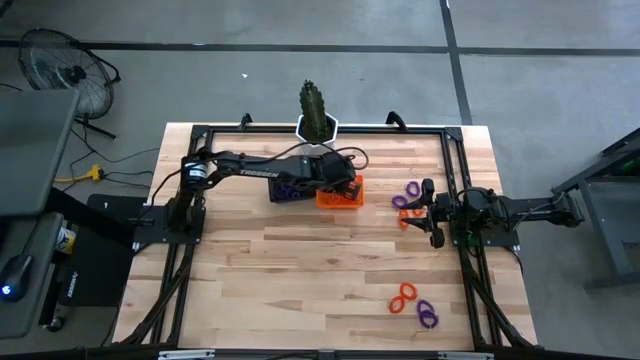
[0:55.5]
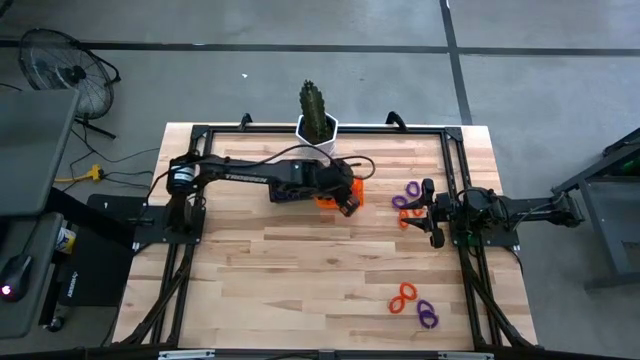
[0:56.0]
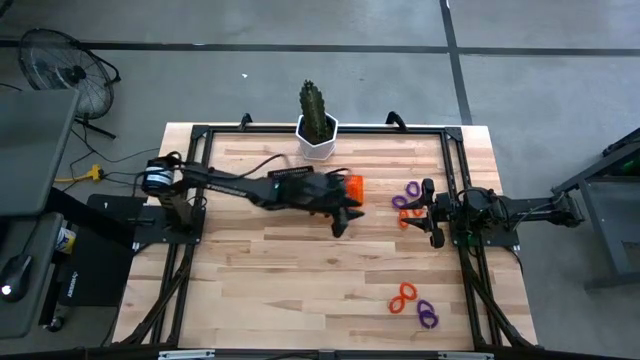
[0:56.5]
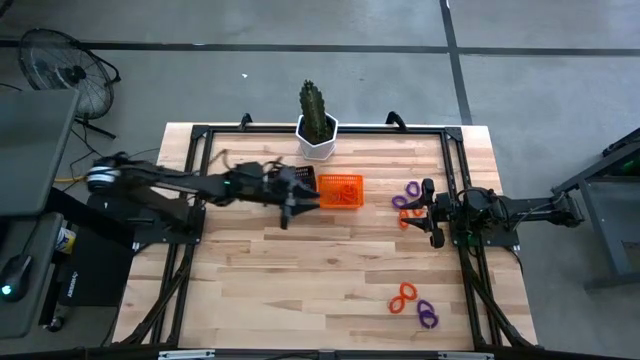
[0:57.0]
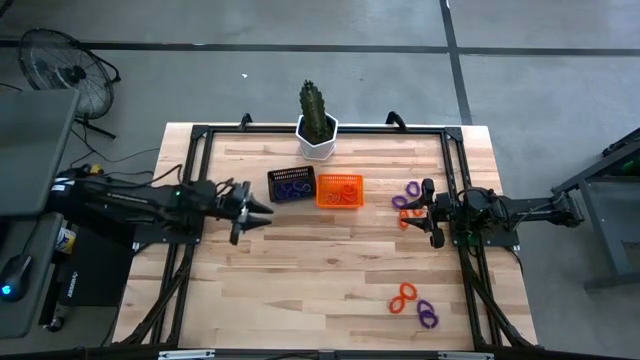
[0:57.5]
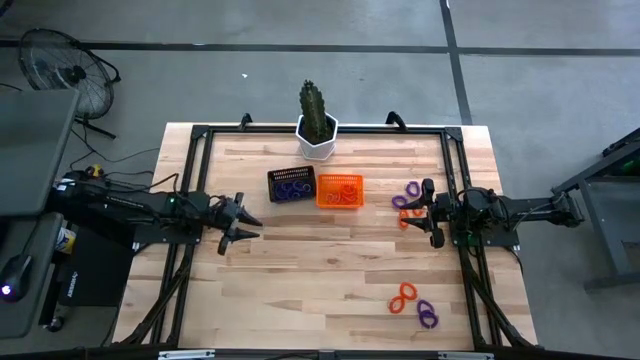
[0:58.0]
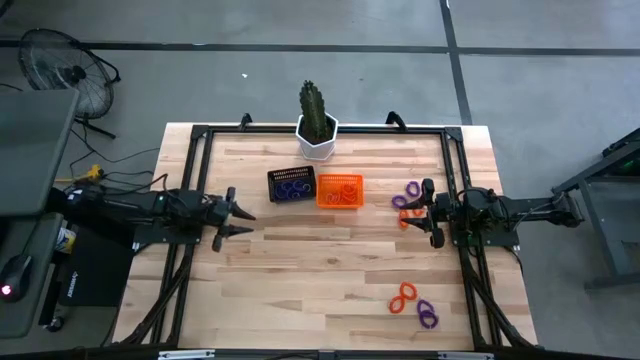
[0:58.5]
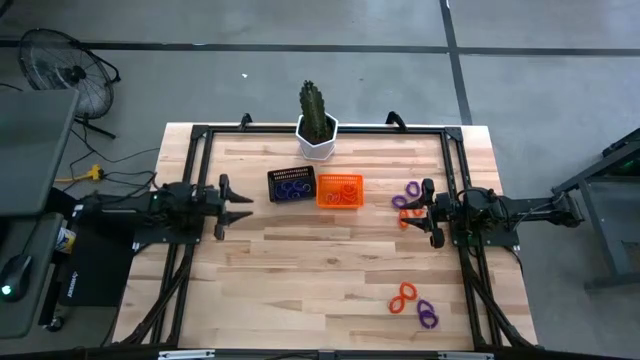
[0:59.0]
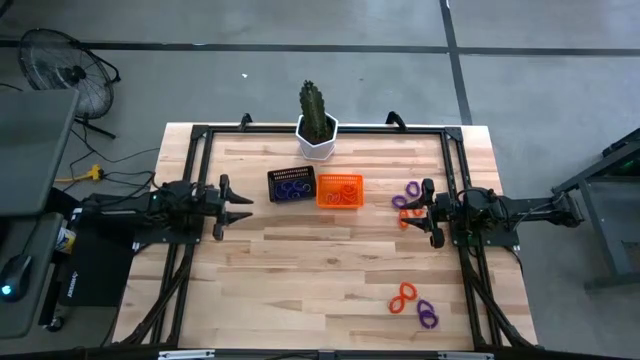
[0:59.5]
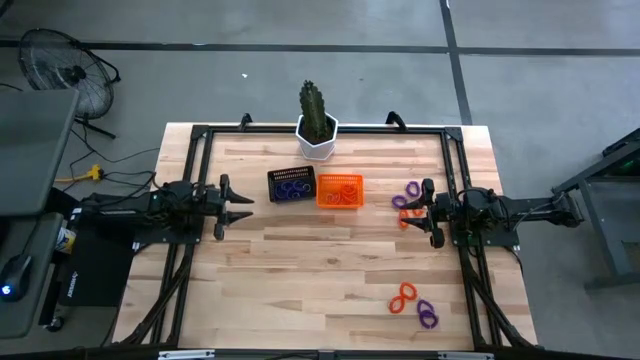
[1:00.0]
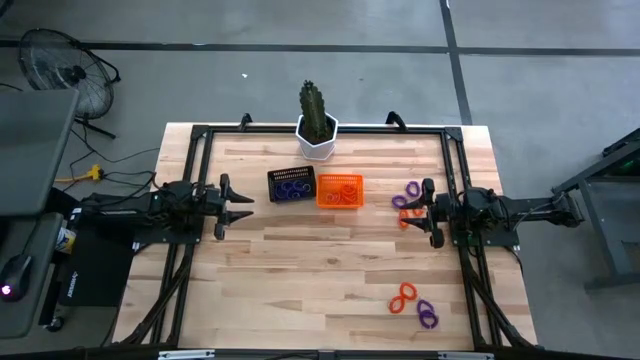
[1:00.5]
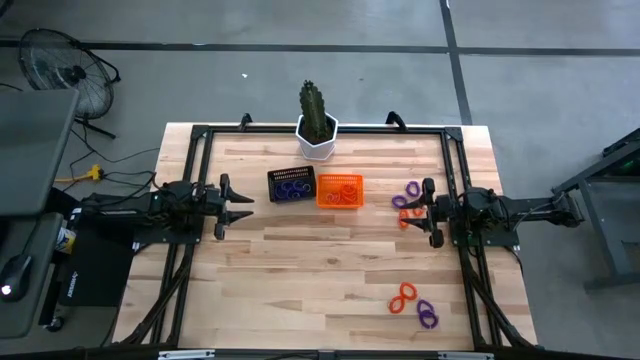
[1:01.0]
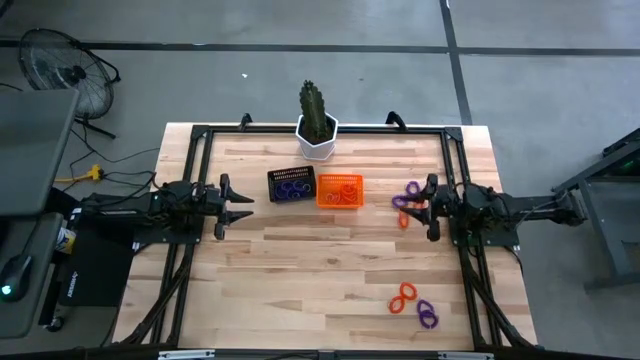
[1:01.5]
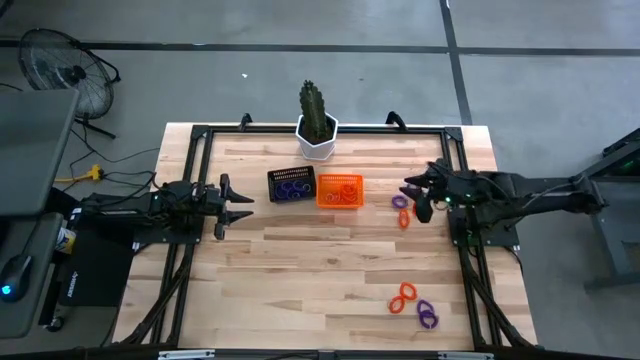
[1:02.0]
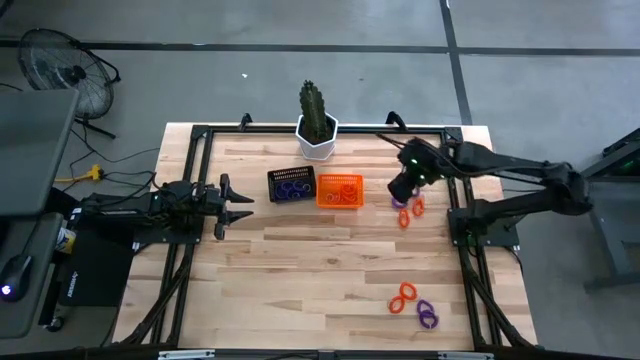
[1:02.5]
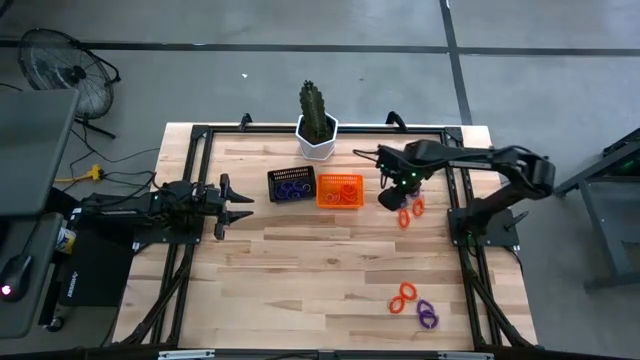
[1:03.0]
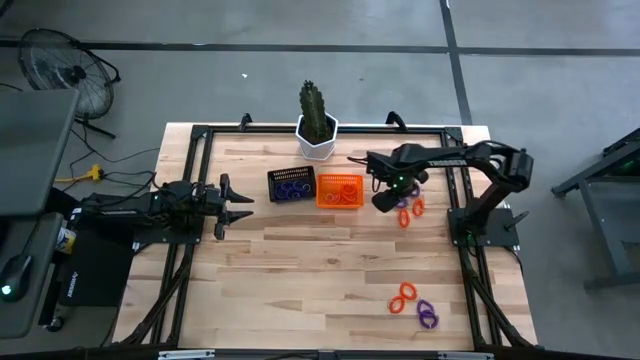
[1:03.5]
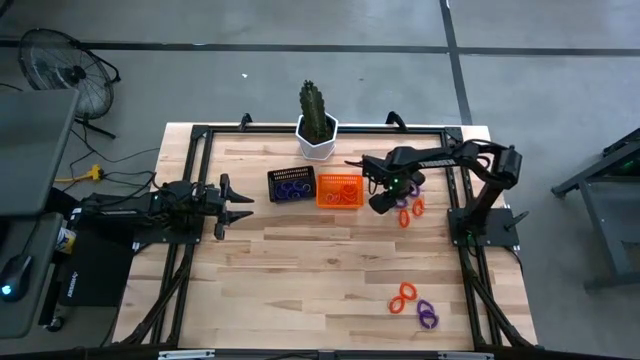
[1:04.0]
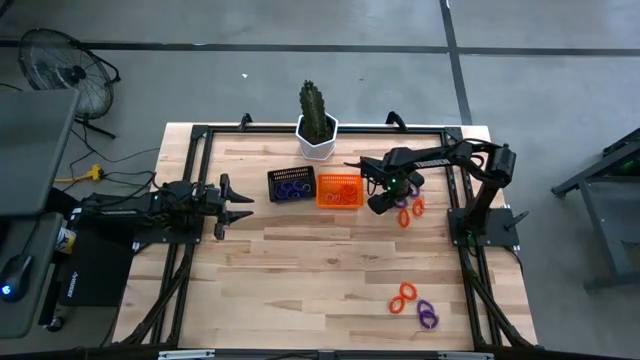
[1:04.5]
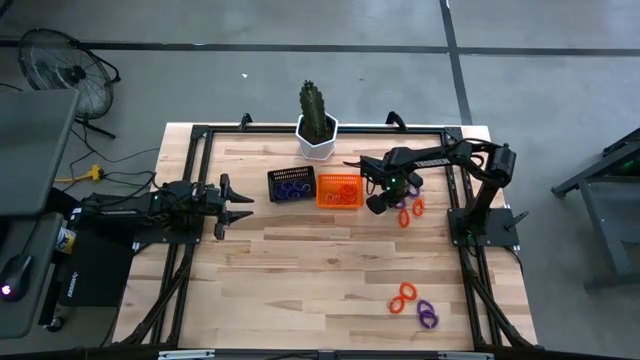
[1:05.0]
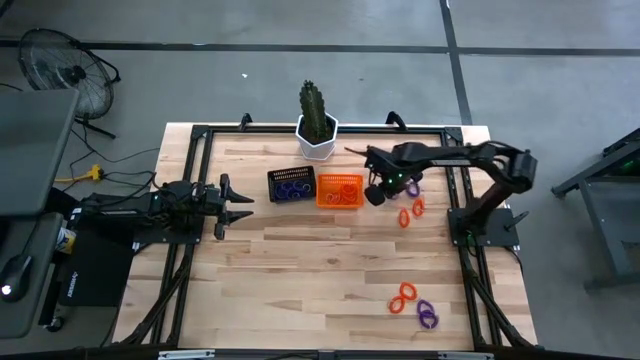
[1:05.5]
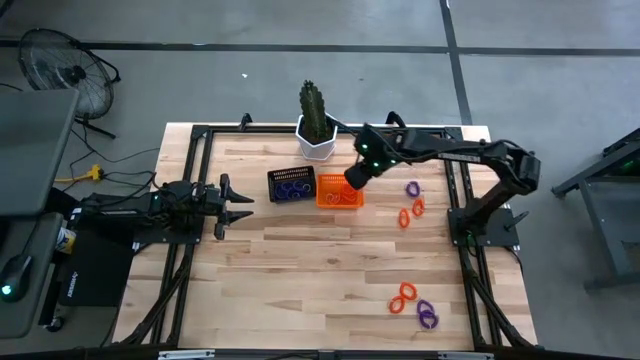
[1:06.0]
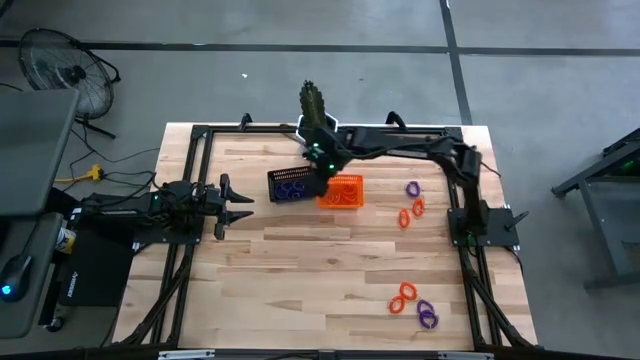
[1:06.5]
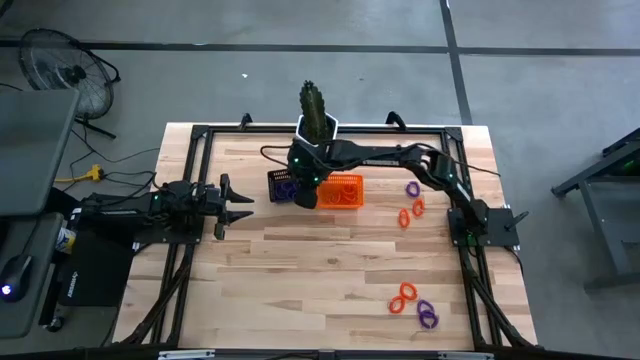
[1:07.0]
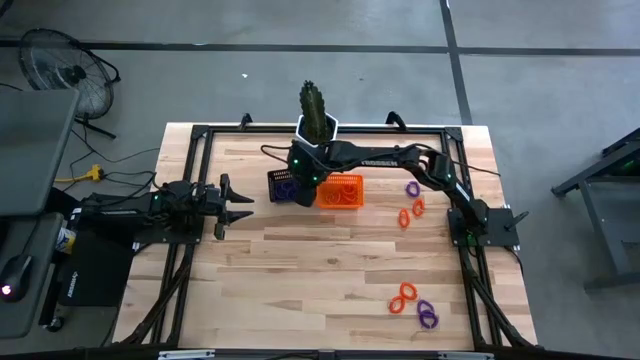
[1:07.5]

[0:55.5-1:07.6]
Task: Sort spring keychains
Put the purple spring keychain in the black bin

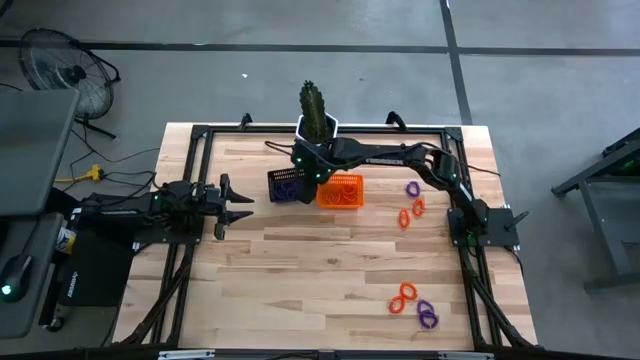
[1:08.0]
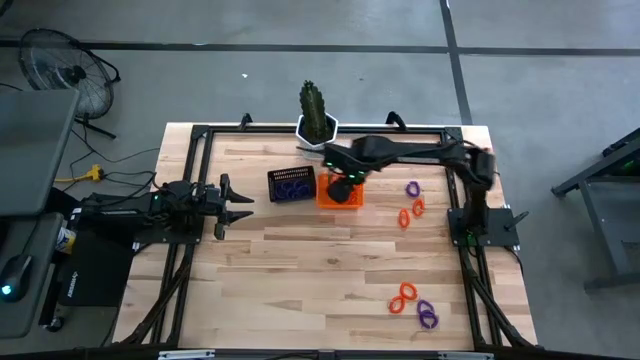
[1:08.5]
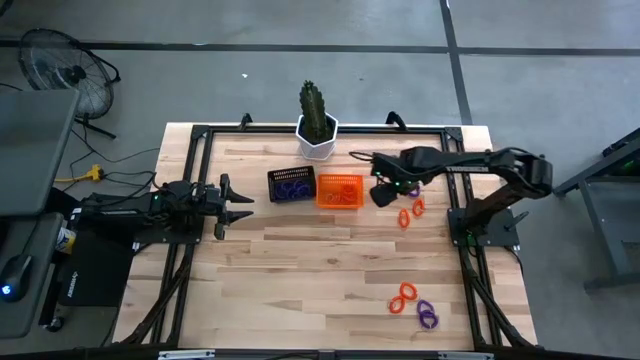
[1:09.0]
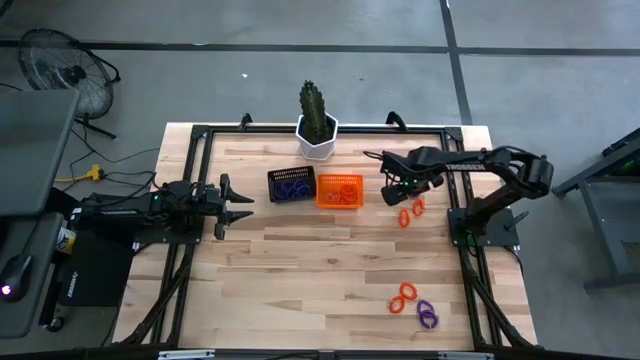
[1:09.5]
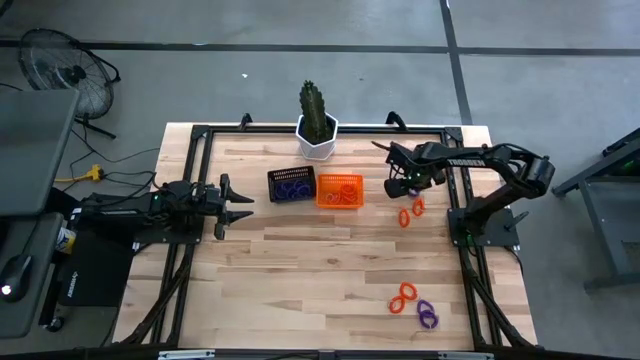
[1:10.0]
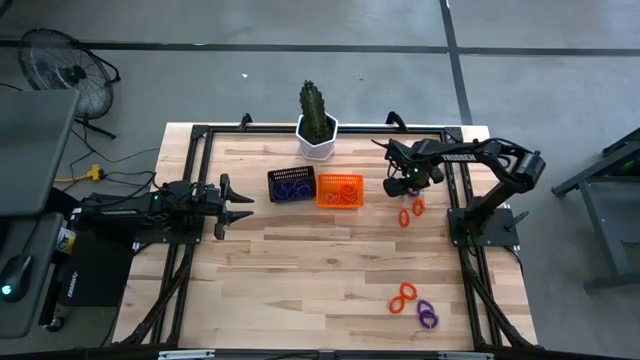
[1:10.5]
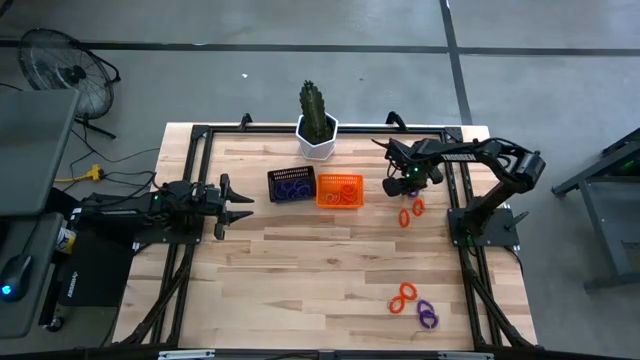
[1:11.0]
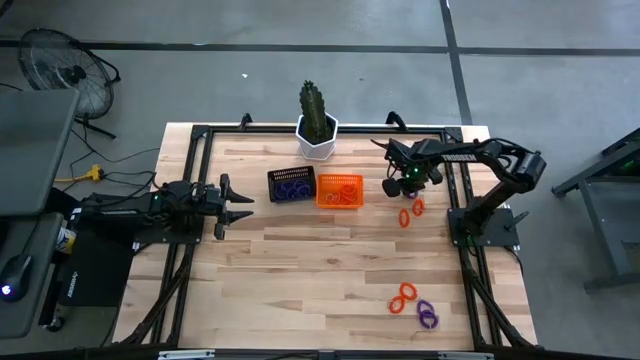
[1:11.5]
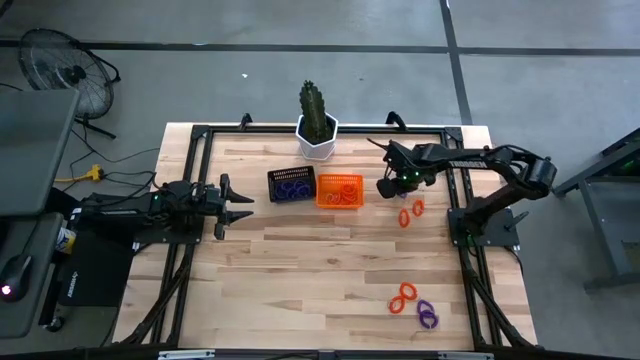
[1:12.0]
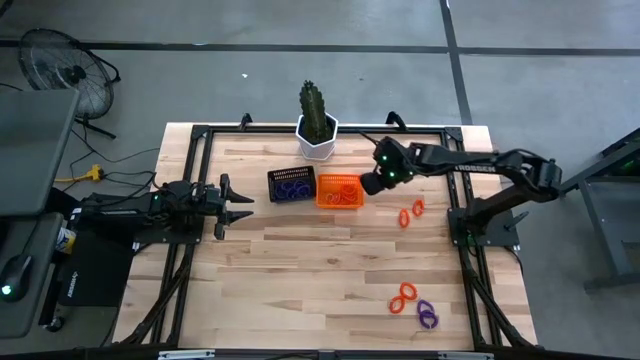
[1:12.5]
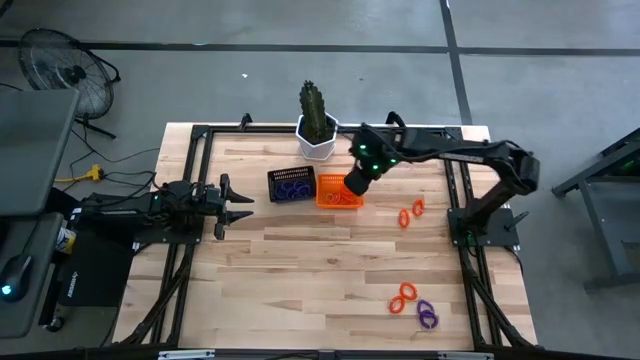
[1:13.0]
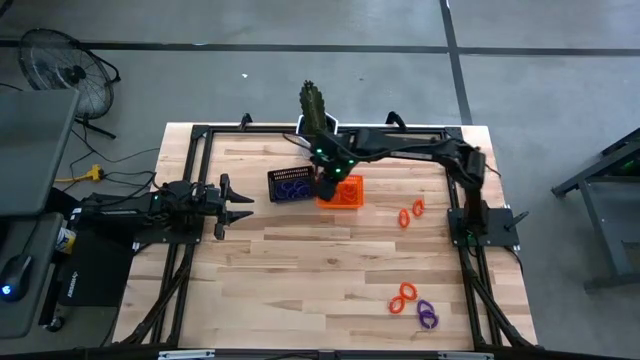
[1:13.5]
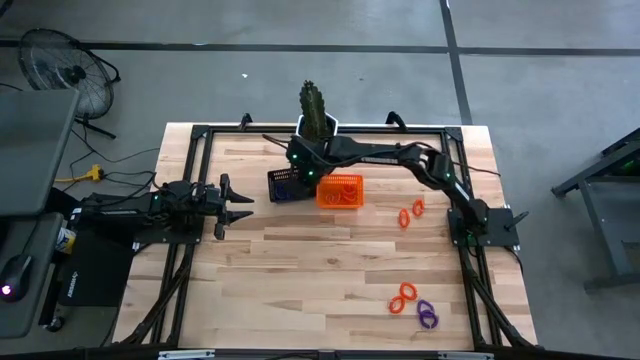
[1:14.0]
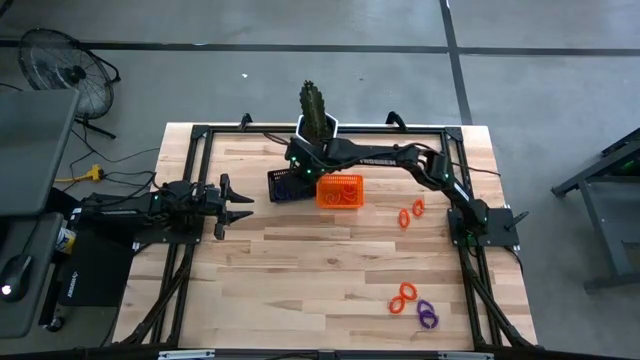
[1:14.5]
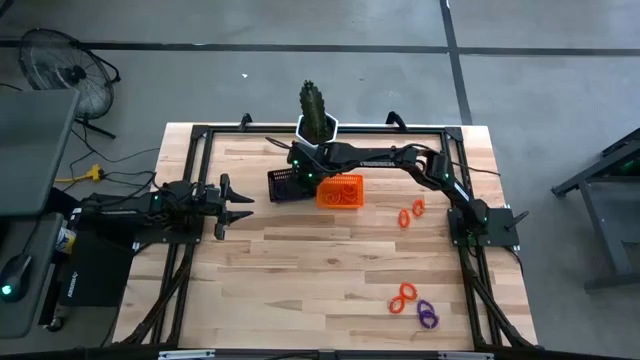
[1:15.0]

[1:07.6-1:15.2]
Put the purple spring keychain in the black bin

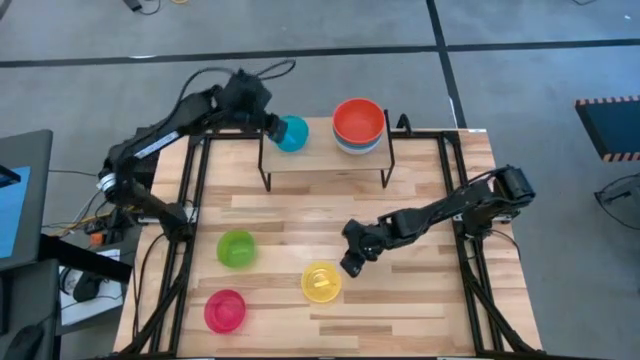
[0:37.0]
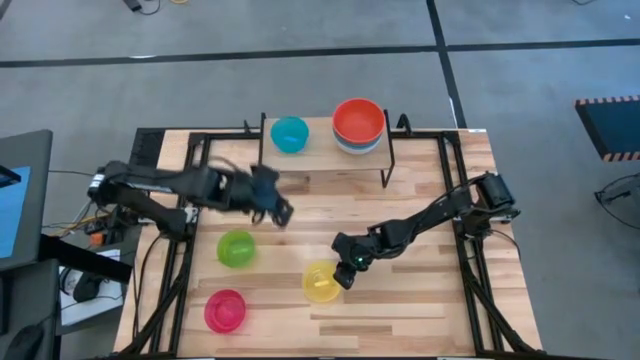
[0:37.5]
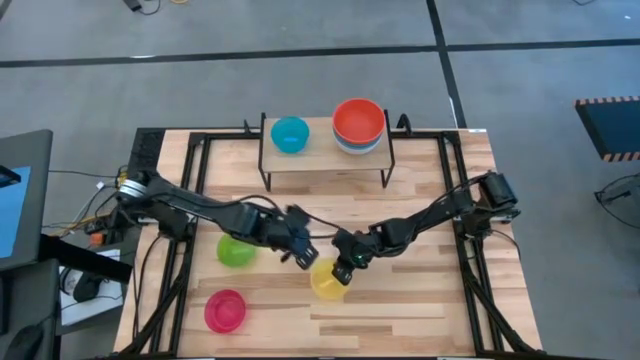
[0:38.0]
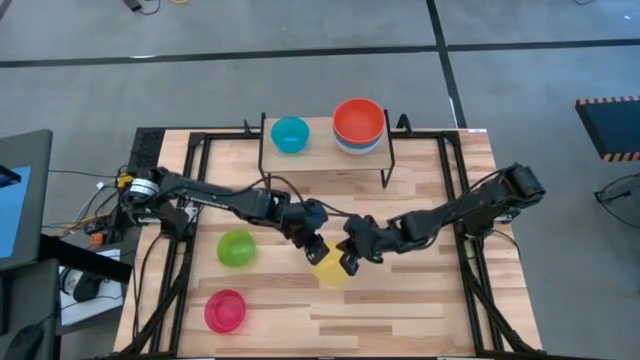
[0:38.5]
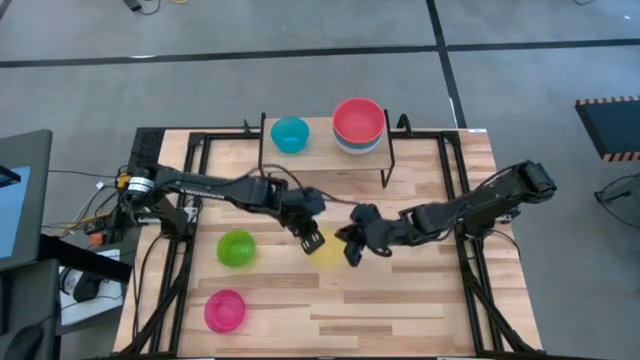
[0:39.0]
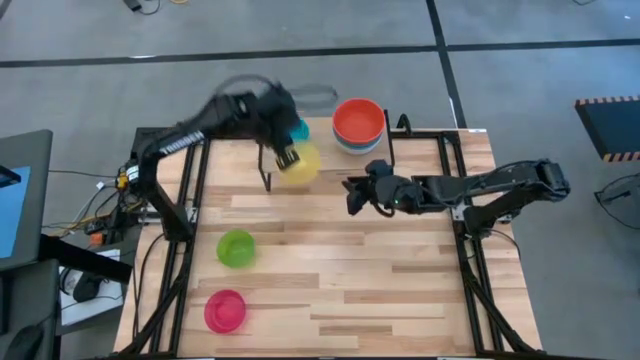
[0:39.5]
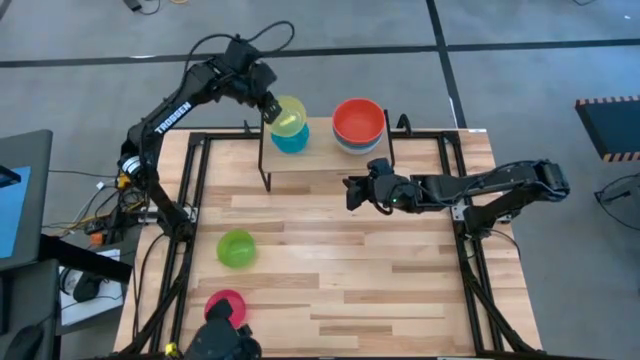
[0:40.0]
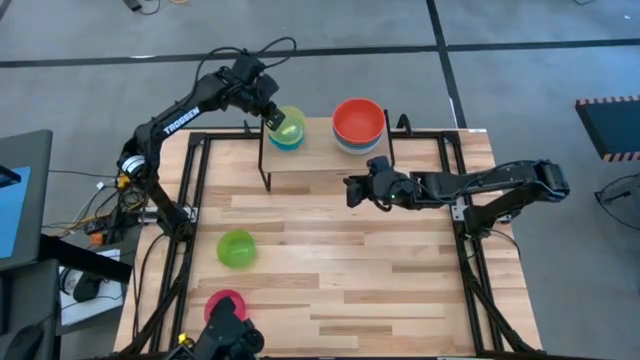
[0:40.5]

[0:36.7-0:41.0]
Task: Place and stack bowls onto a shelf
Stack the small yellow bowl on top of the small blue bowl on the shelf
